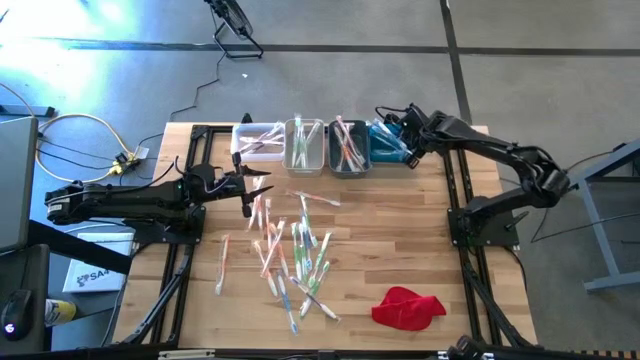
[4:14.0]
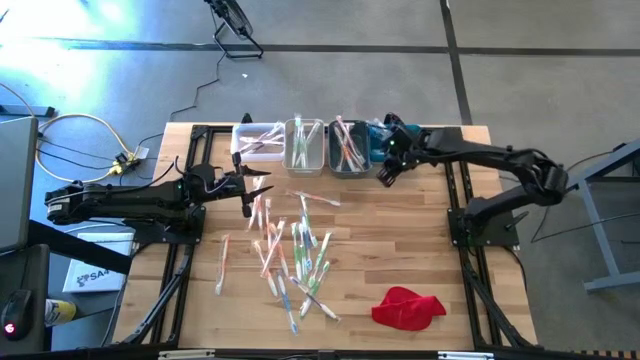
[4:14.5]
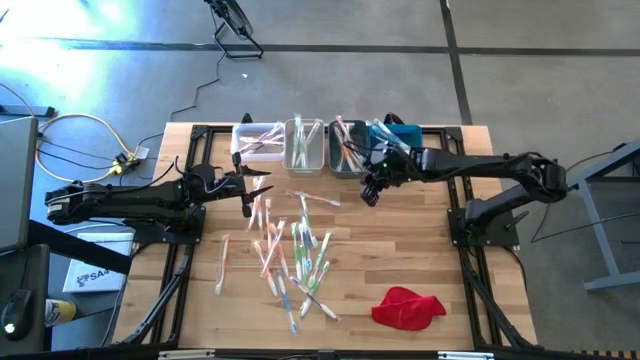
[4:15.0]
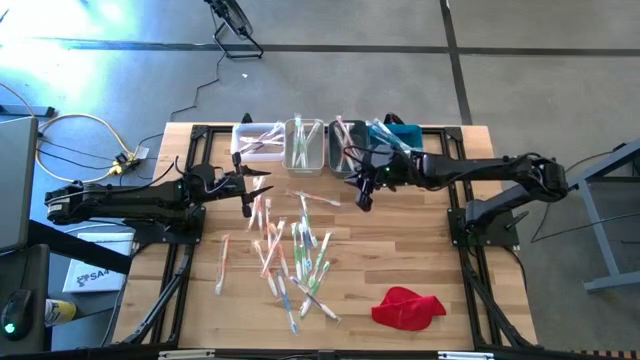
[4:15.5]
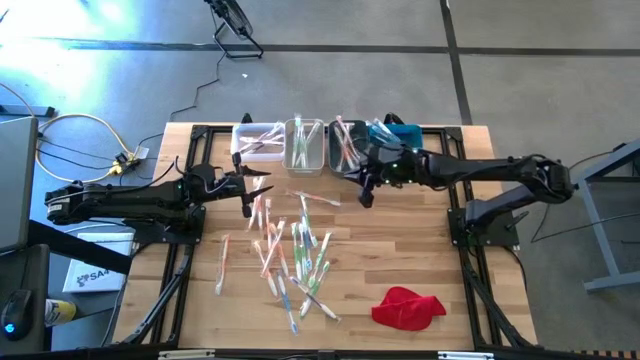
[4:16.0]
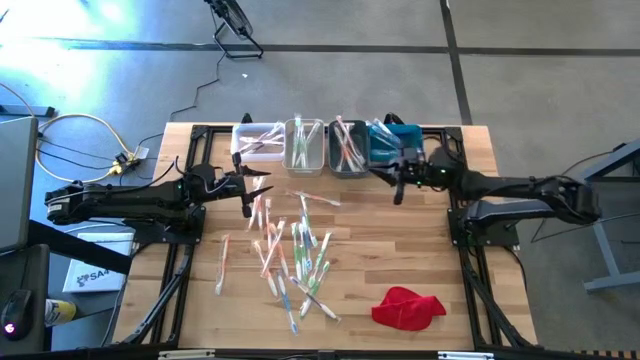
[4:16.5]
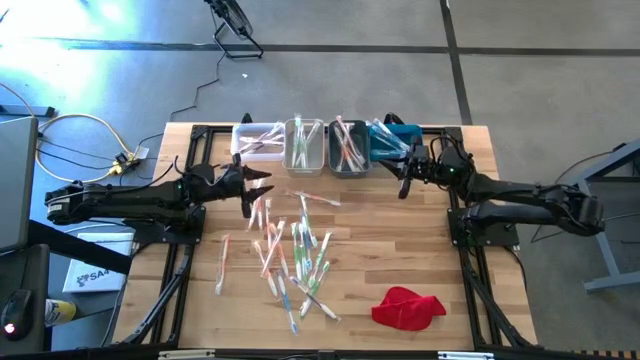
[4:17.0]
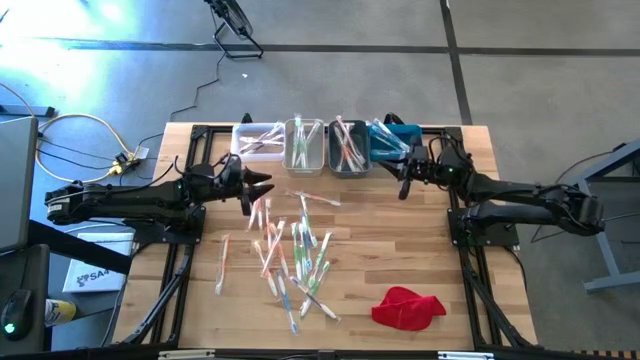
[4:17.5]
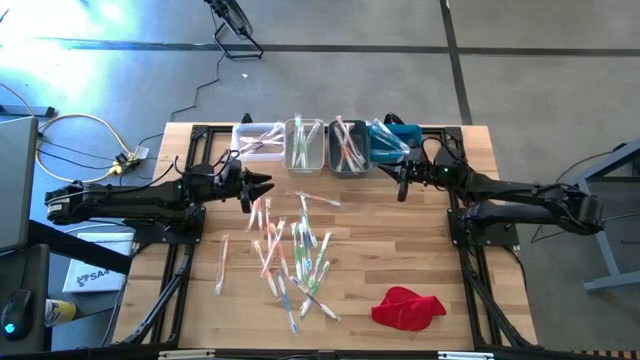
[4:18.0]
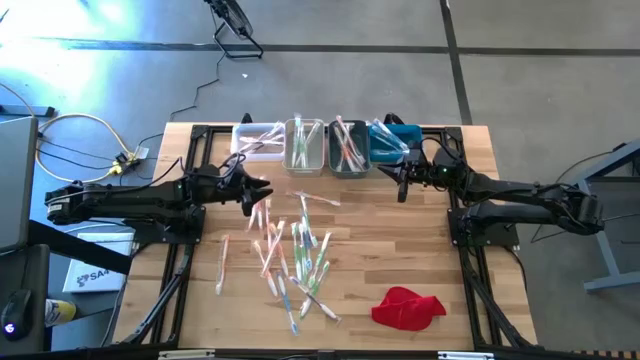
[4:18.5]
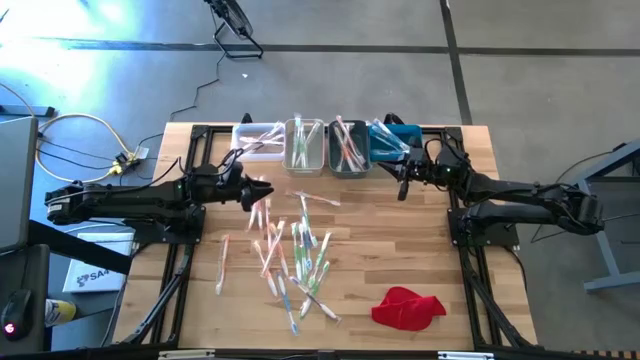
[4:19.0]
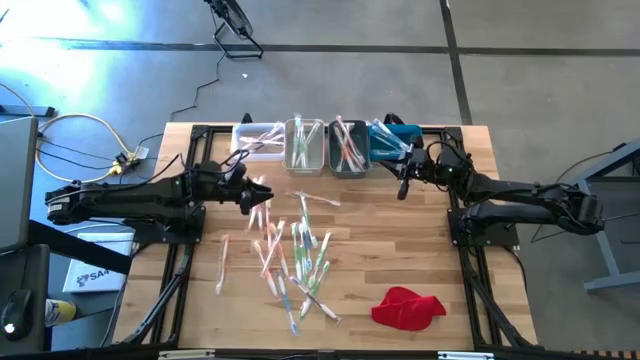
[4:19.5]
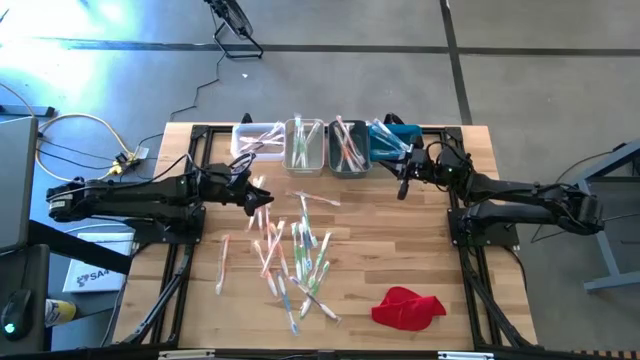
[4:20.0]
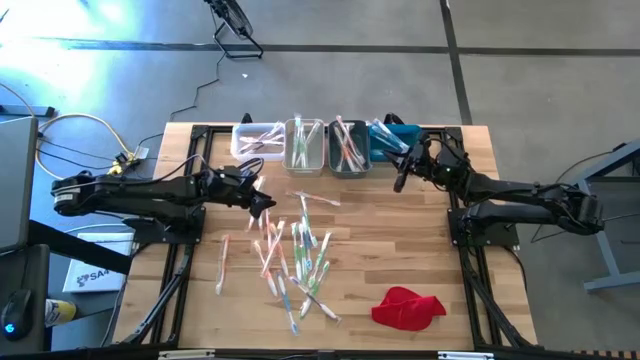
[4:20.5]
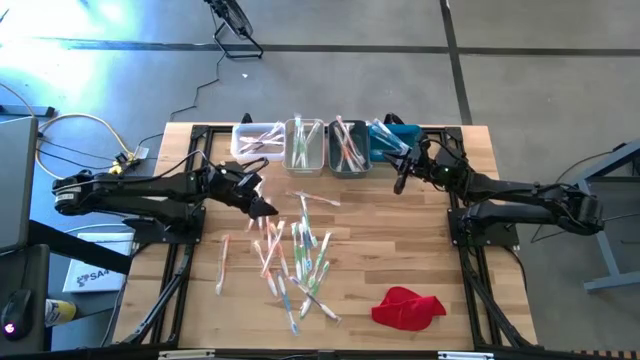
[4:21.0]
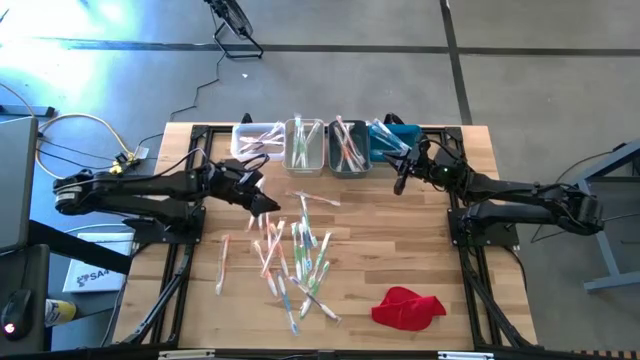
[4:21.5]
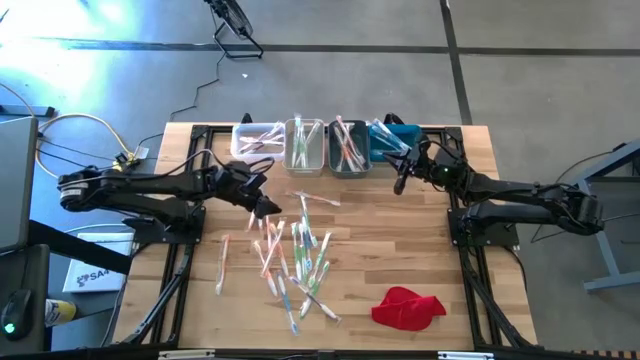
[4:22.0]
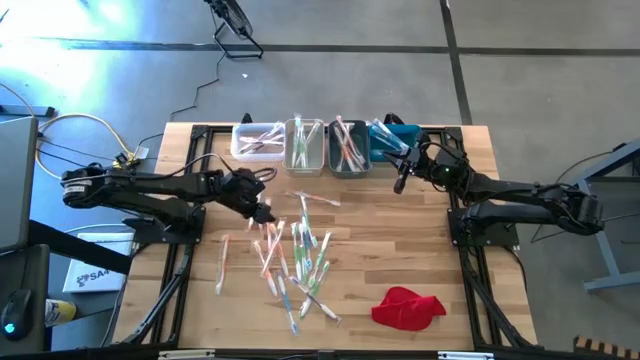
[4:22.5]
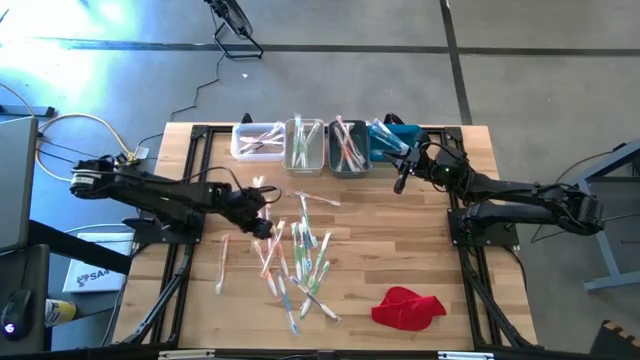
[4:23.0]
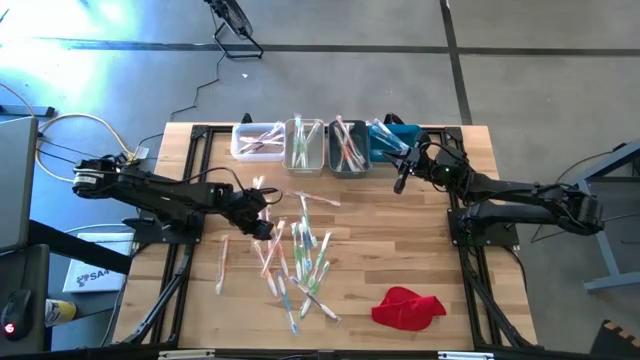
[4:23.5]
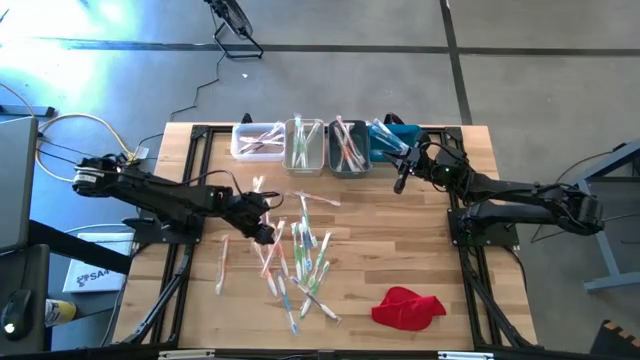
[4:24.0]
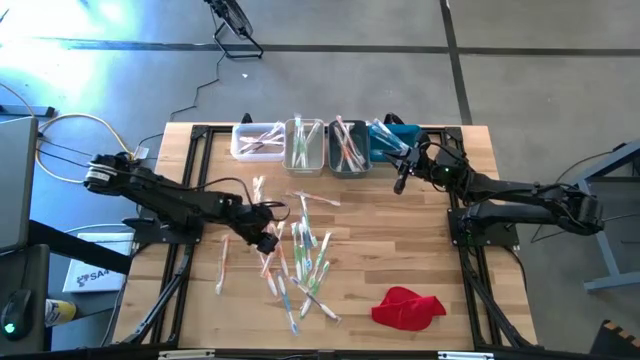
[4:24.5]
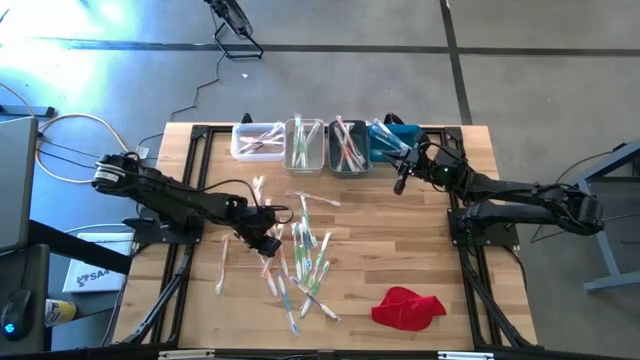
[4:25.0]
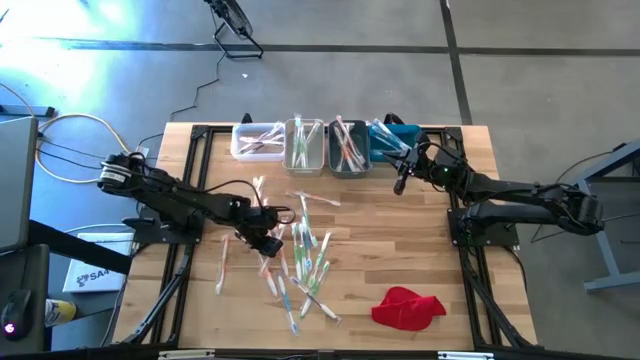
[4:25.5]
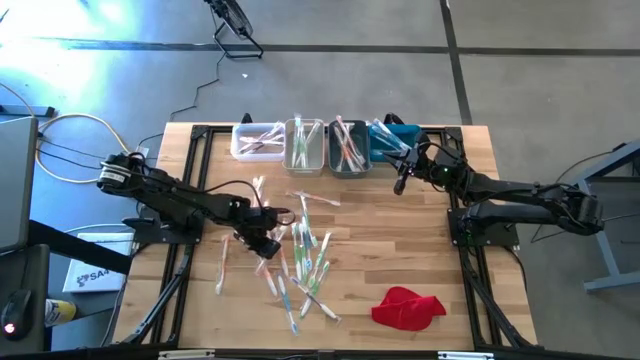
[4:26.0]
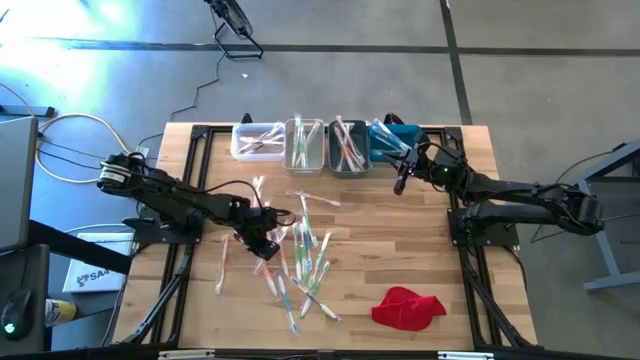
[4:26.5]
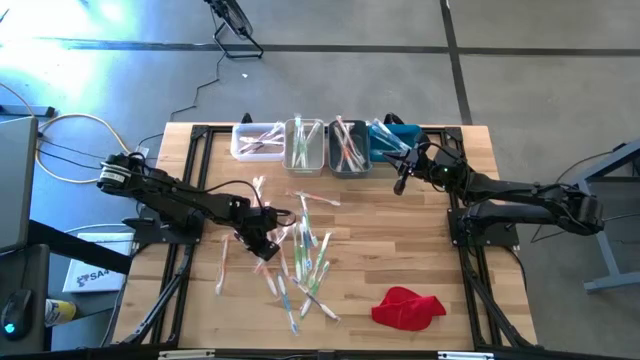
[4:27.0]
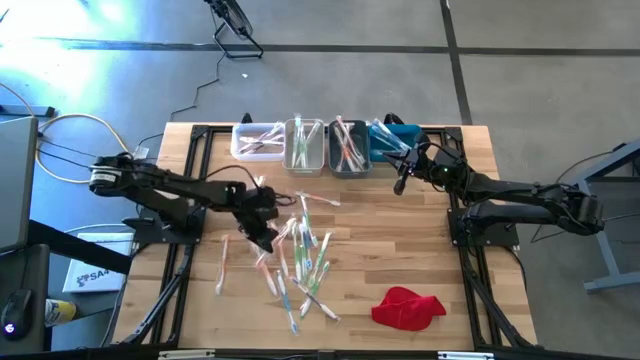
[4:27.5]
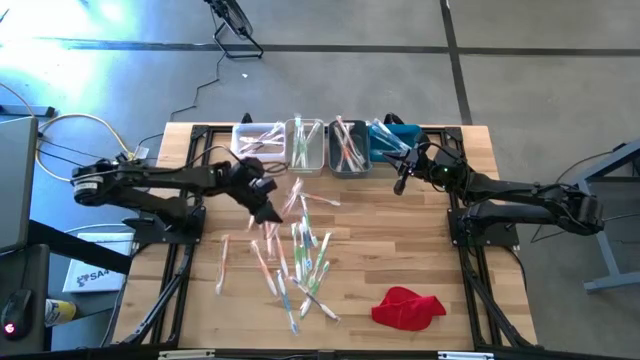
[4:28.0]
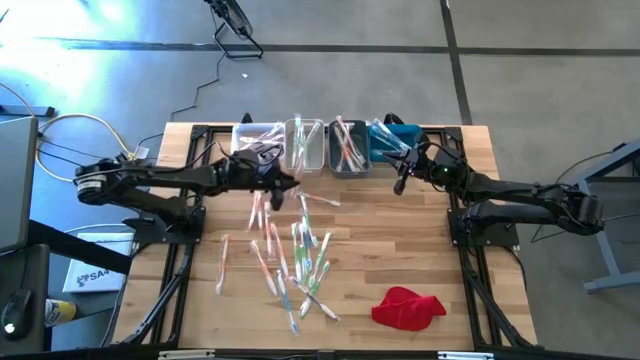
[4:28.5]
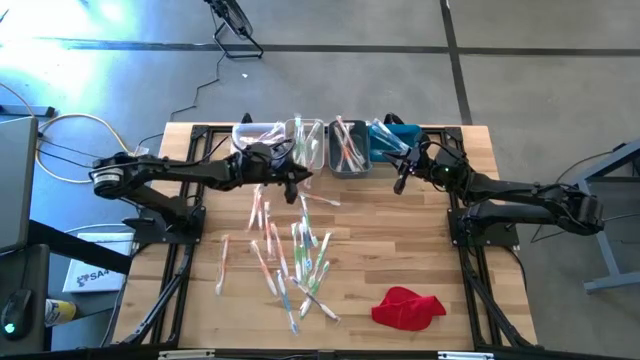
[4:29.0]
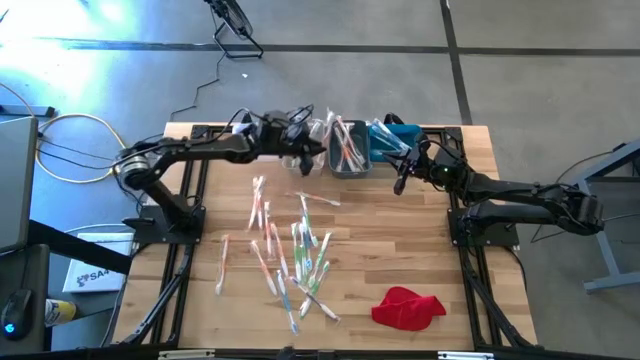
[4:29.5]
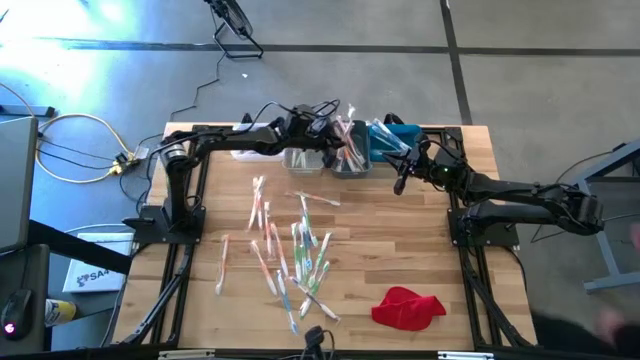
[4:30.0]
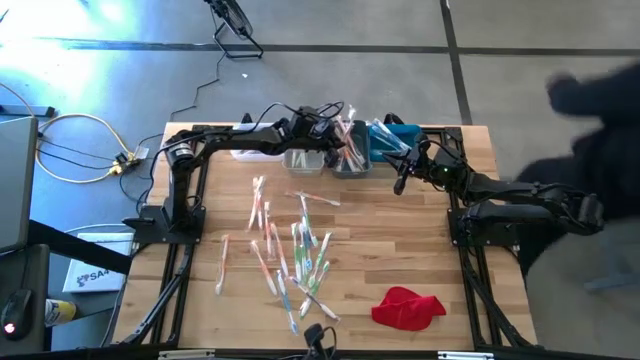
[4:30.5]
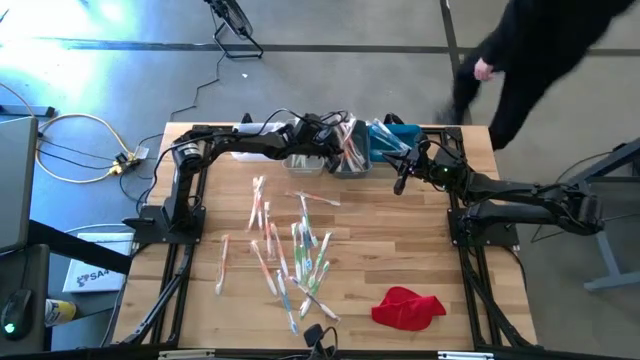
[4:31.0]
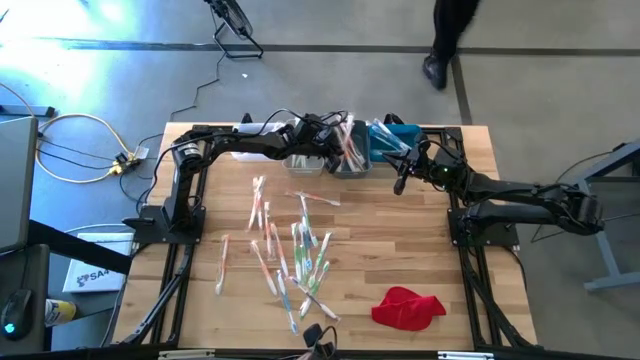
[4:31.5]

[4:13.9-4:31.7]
Task: Pick & Place Toothbrushes
Put the orange toothbrush into the dark green bin

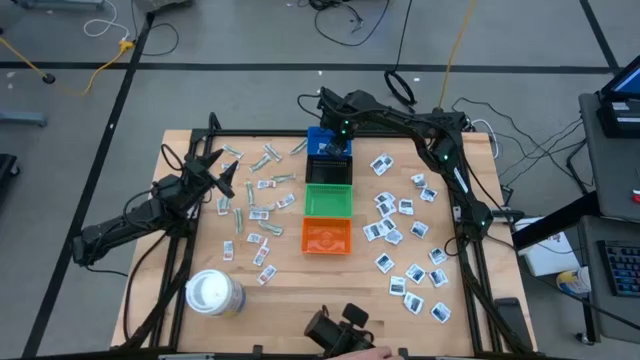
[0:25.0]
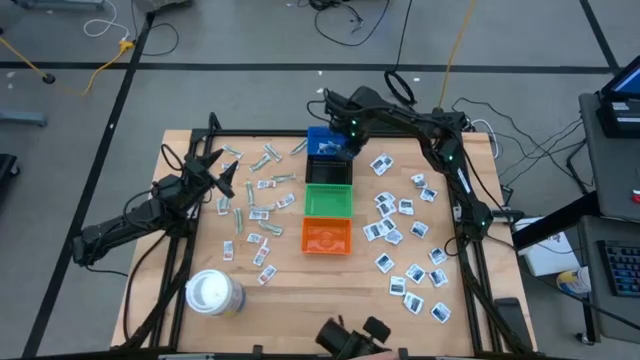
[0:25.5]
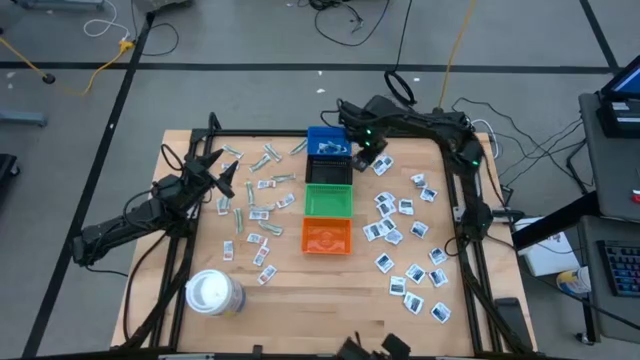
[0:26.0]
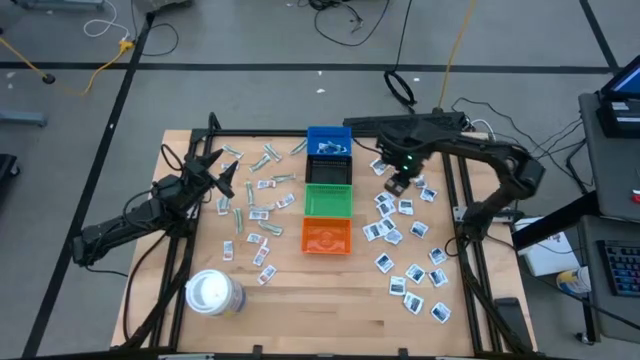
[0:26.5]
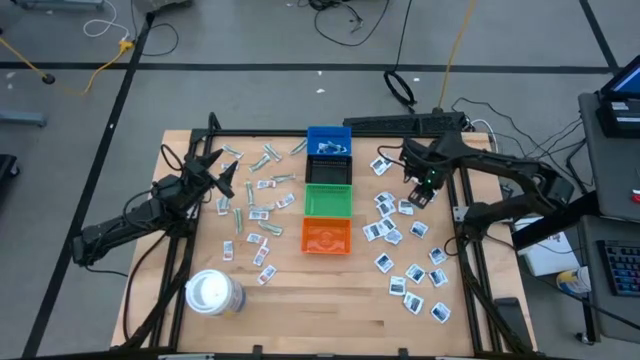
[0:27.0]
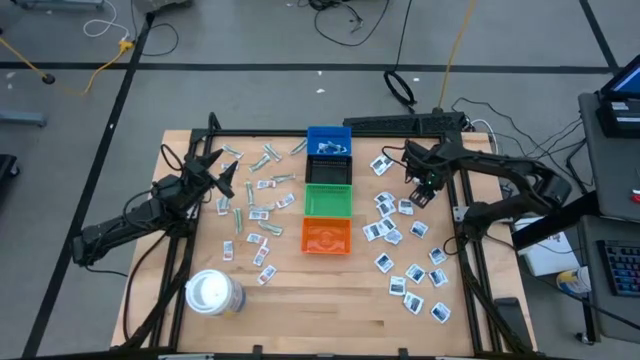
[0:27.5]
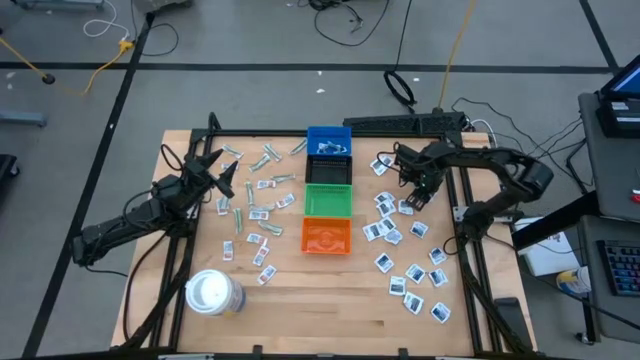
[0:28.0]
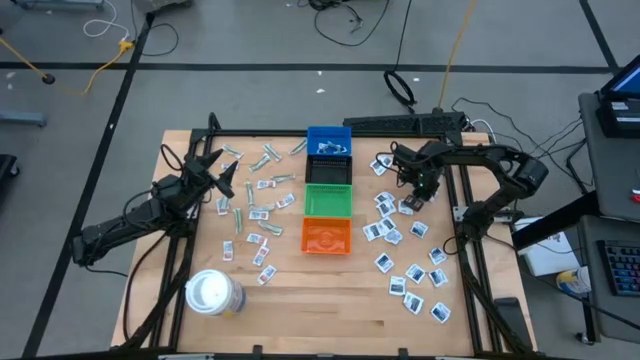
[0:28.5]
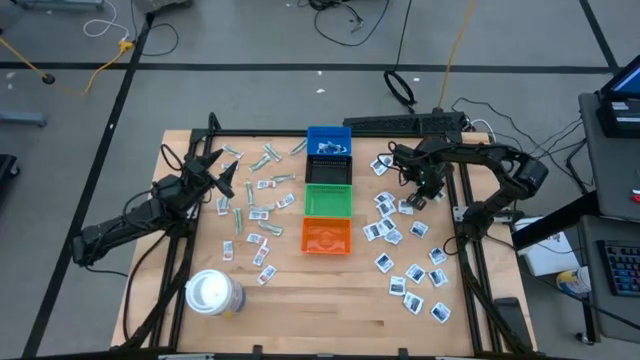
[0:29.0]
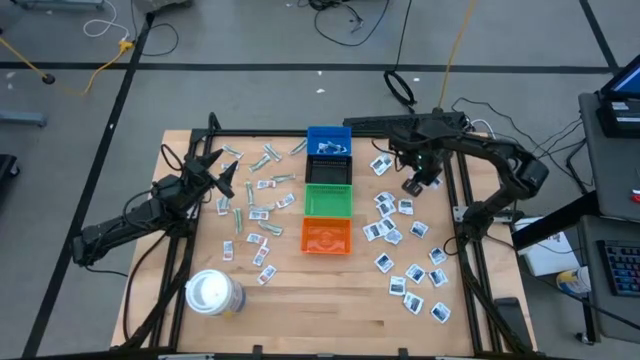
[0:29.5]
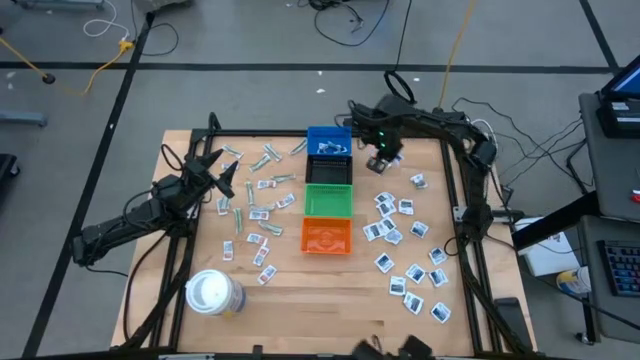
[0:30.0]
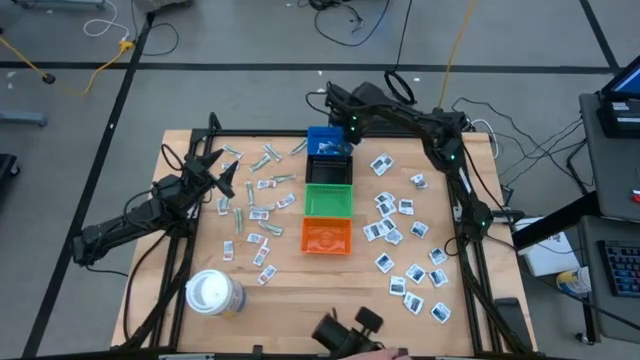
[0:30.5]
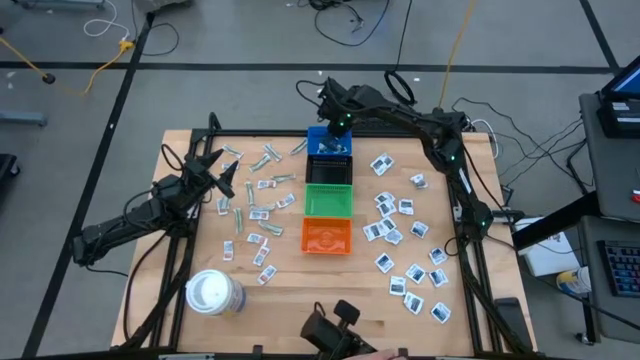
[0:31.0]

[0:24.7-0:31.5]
Task: Pick & Place First Aid Supplies
Put the blue alcohol pad into the blue bin
